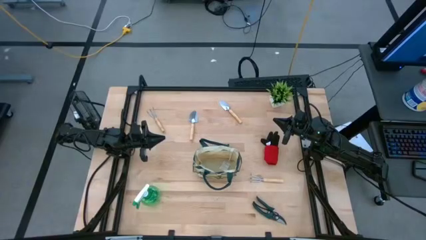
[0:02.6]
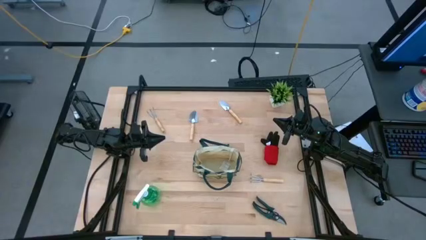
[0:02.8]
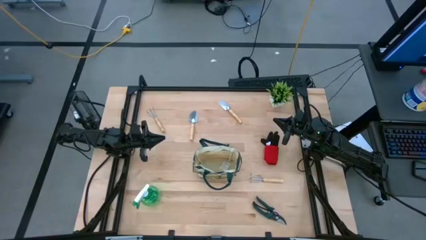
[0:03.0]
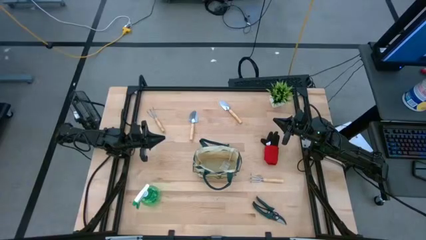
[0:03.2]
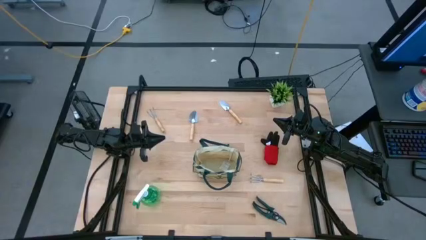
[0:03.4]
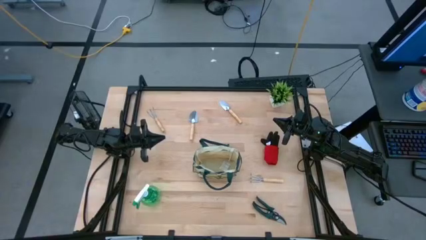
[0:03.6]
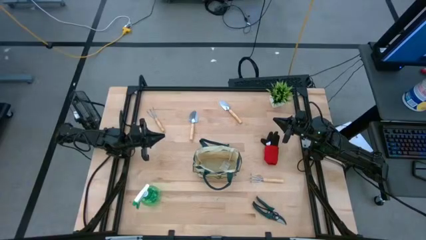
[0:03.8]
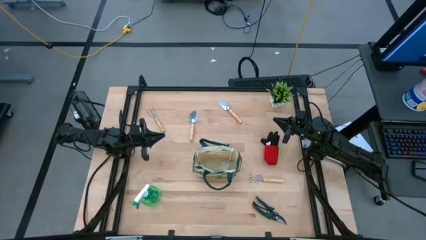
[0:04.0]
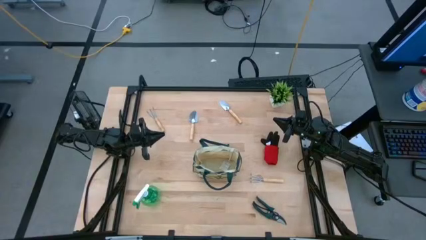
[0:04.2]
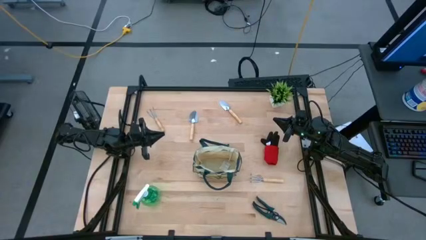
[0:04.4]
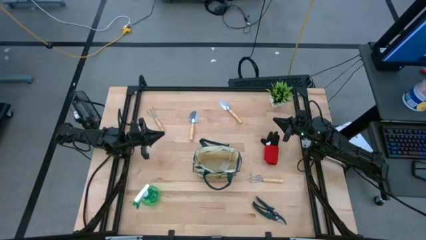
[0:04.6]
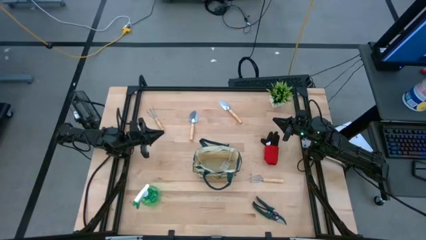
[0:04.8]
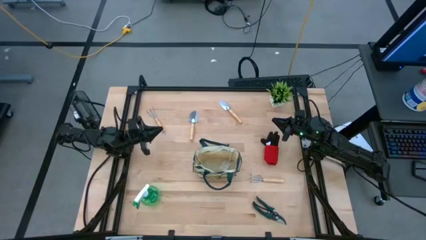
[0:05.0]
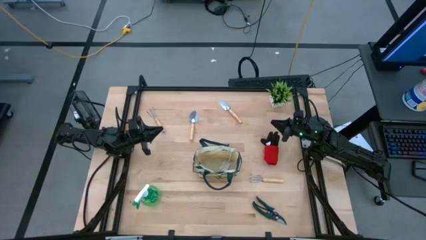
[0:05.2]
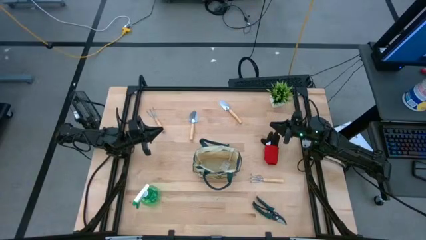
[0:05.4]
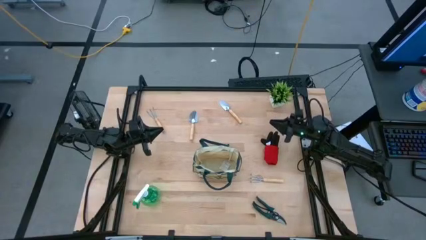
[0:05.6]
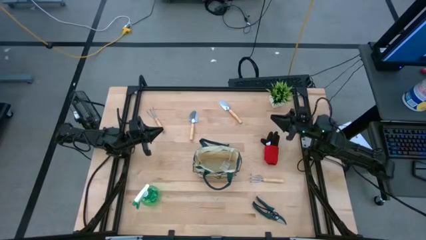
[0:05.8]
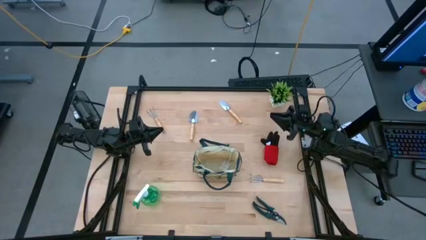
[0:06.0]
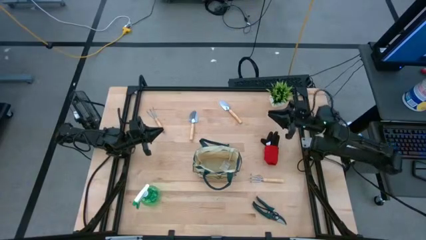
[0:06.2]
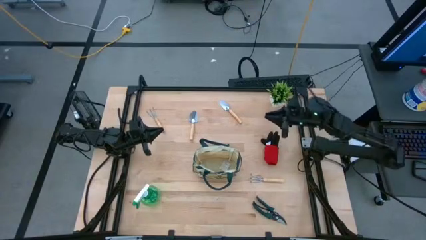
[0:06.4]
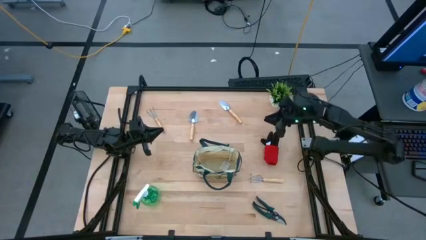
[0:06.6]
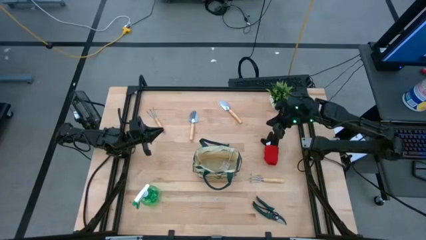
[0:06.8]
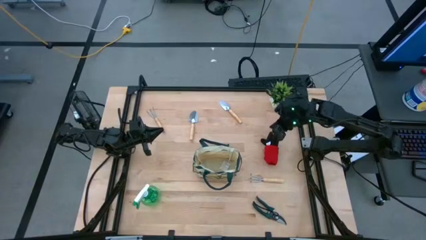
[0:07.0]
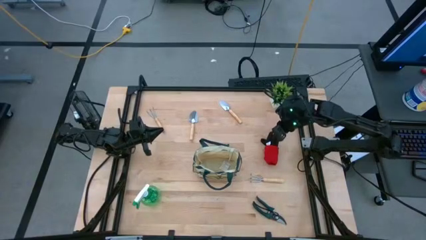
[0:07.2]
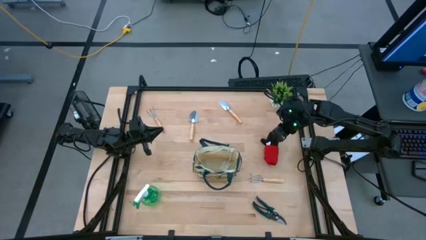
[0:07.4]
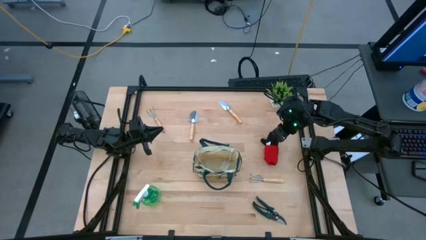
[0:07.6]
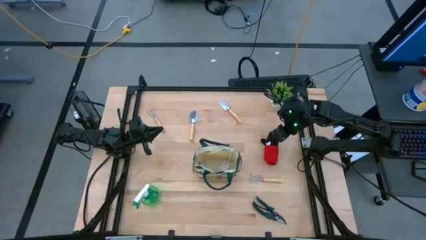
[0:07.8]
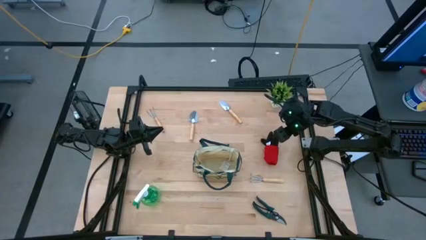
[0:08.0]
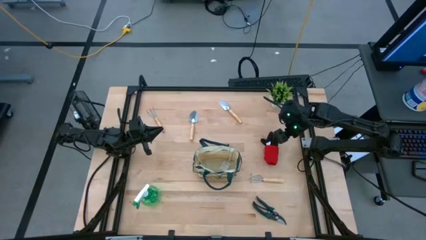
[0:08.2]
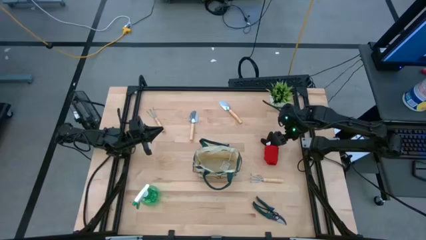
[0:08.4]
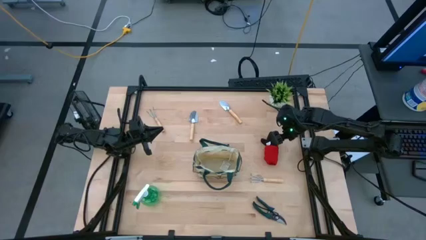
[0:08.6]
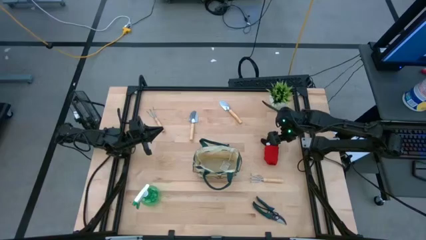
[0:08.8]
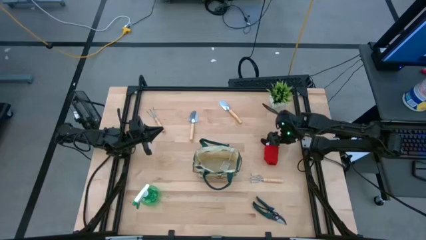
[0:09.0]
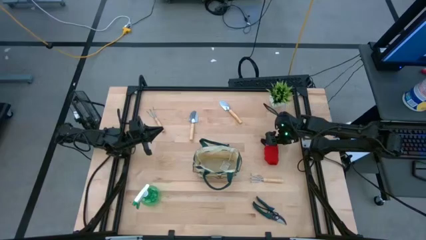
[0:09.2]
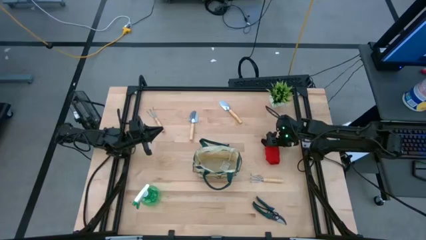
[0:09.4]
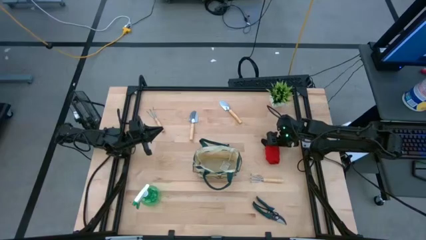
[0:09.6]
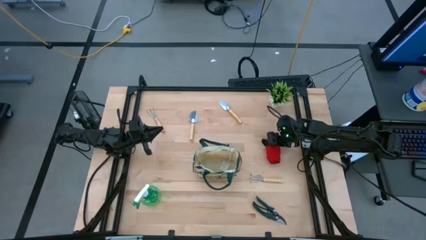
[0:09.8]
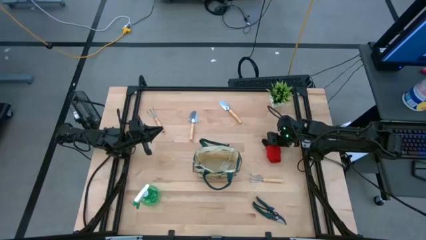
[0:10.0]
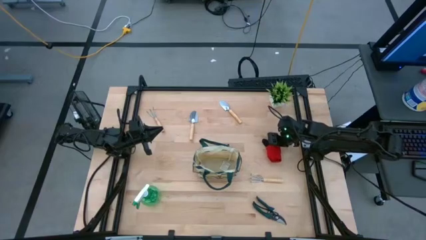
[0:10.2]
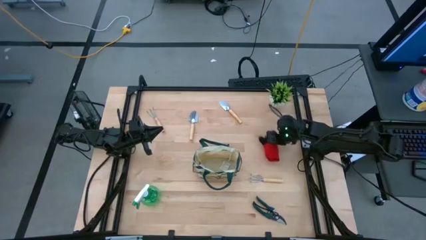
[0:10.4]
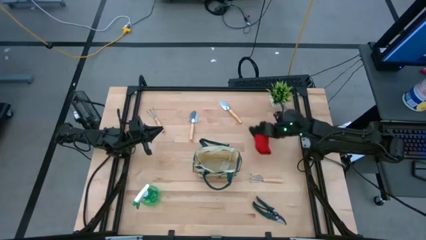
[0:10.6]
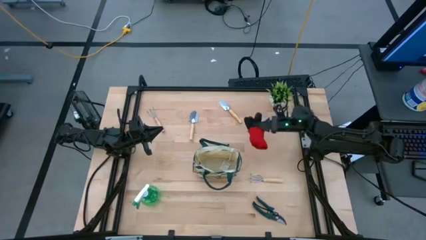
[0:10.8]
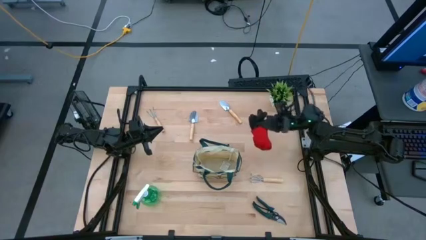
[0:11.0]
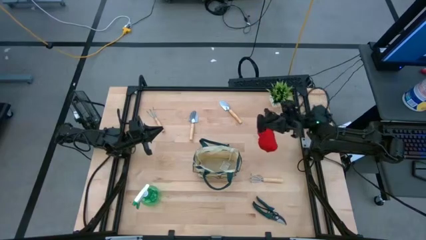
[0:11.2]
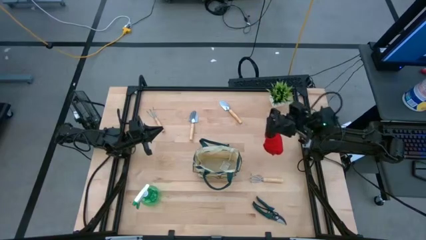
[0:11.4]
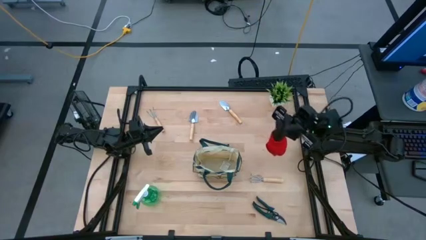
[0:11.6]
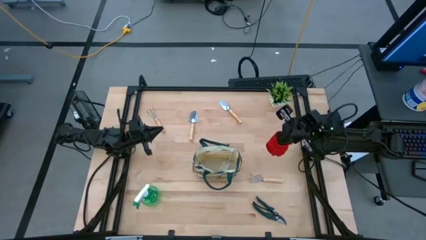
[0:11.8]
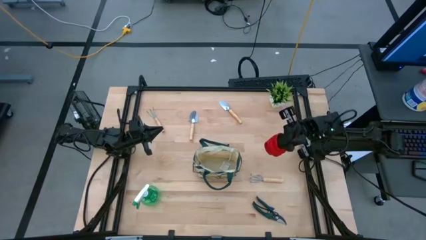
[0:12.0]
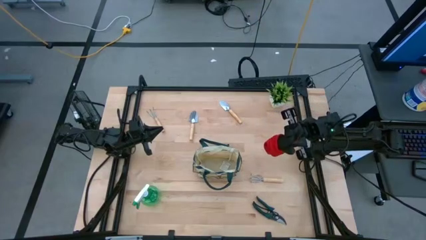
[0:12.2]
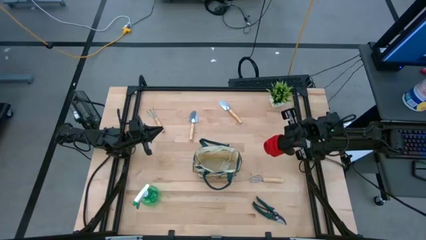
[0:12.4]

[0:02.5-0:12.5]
Task: Pick & Place Garden tools in Gardening bag
Put the red gloves into the white gardening bag

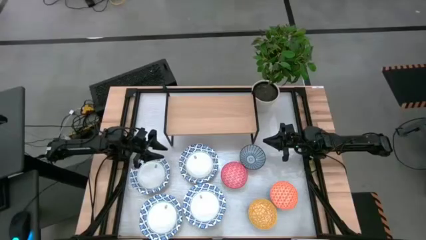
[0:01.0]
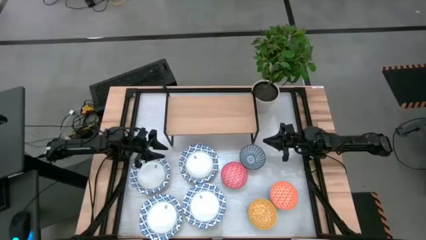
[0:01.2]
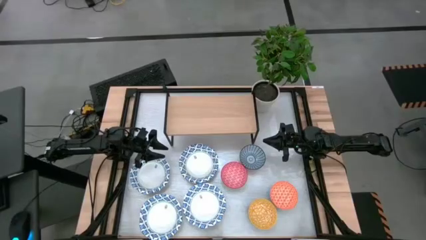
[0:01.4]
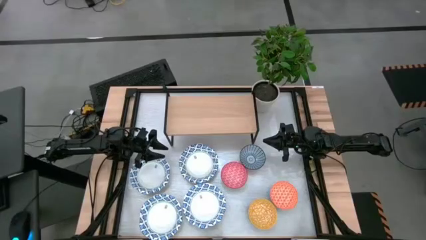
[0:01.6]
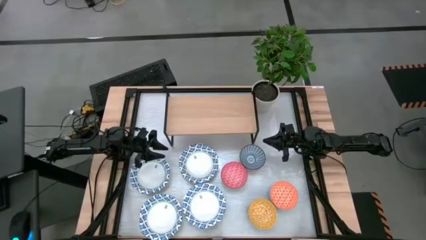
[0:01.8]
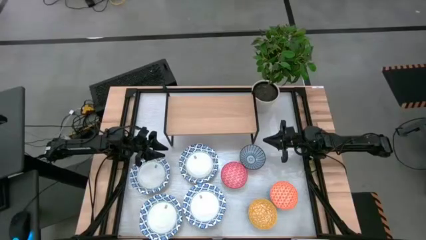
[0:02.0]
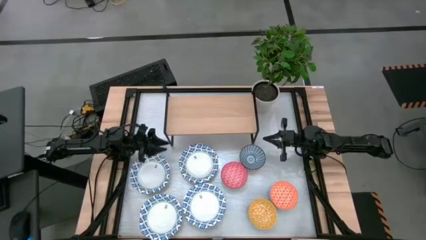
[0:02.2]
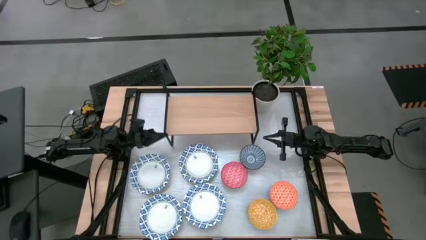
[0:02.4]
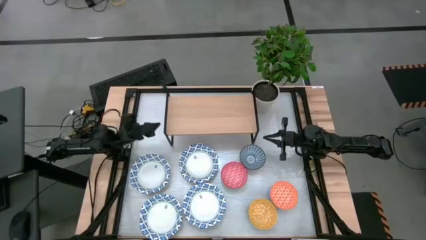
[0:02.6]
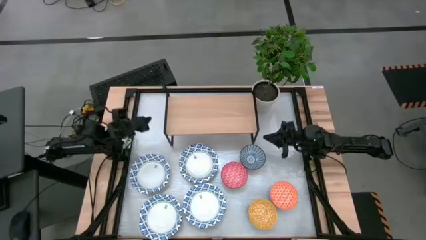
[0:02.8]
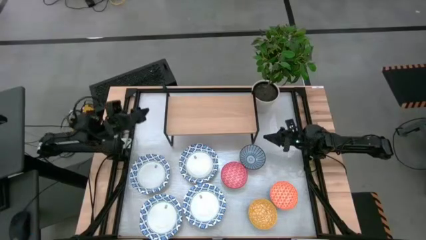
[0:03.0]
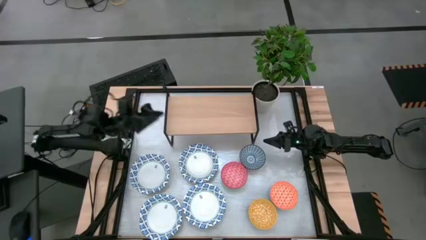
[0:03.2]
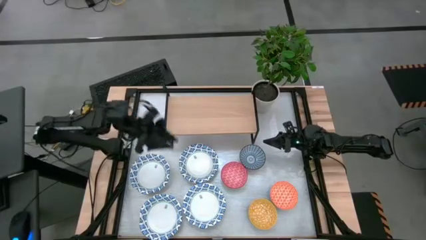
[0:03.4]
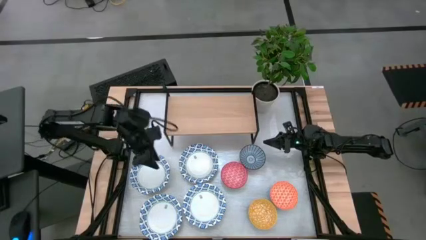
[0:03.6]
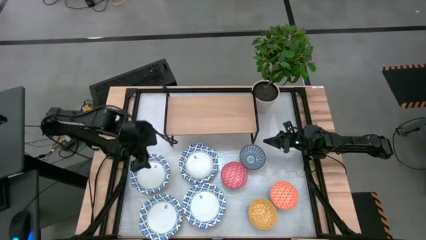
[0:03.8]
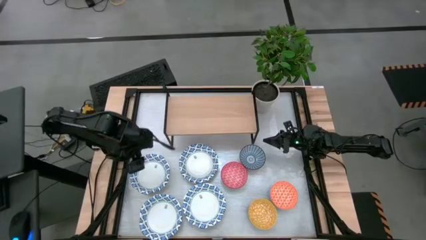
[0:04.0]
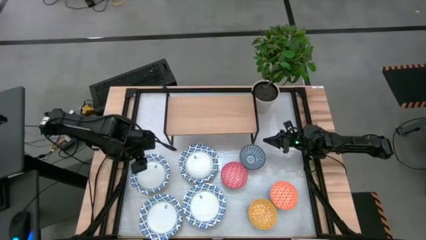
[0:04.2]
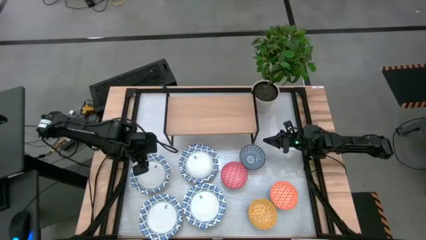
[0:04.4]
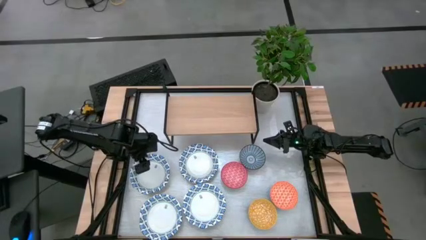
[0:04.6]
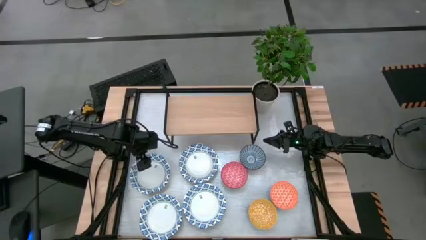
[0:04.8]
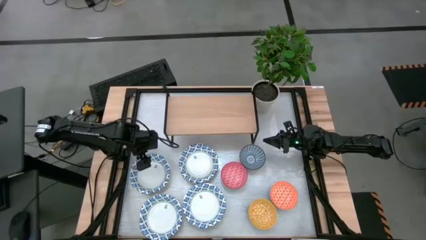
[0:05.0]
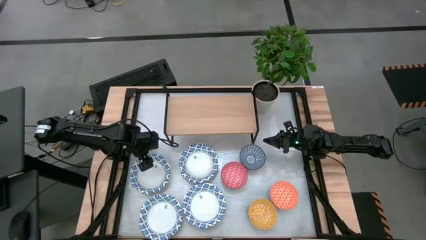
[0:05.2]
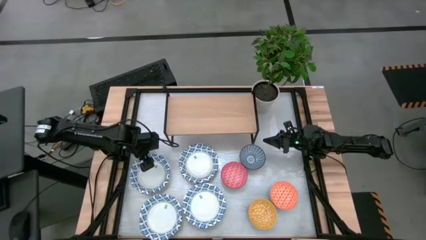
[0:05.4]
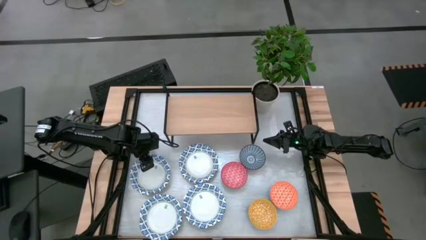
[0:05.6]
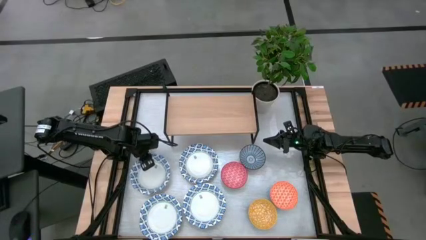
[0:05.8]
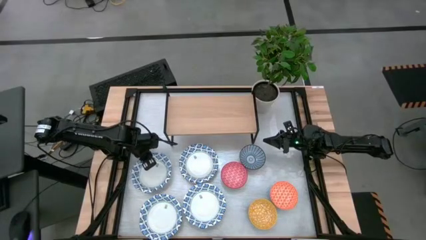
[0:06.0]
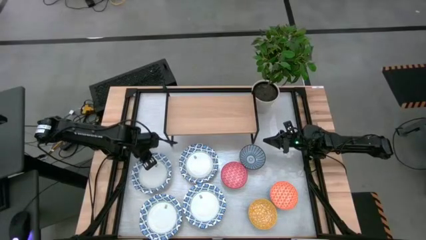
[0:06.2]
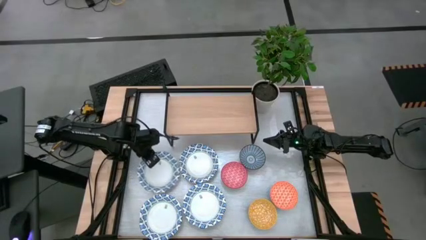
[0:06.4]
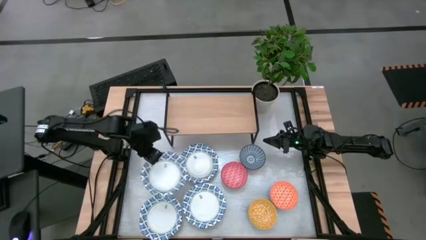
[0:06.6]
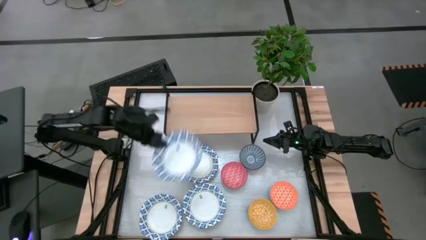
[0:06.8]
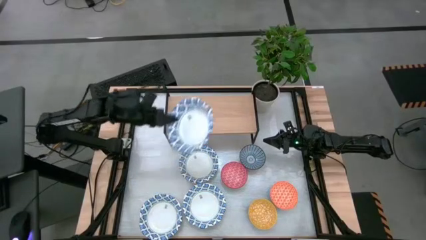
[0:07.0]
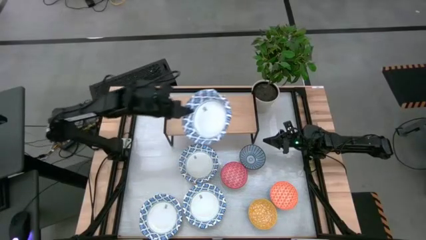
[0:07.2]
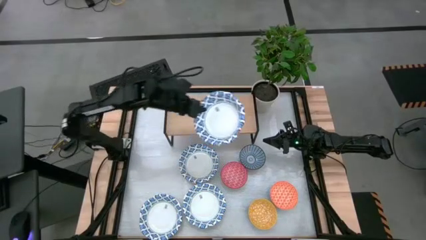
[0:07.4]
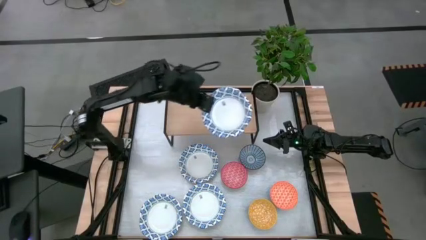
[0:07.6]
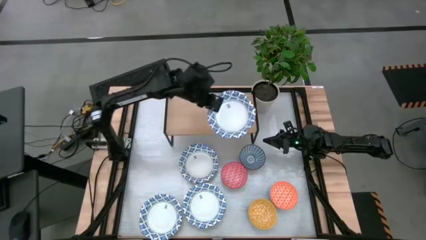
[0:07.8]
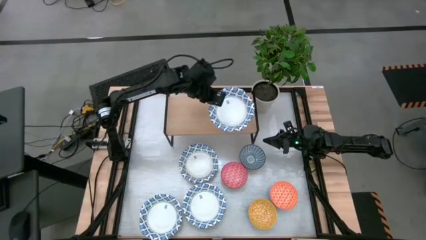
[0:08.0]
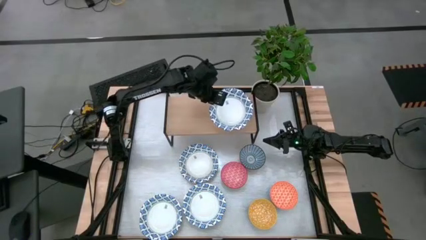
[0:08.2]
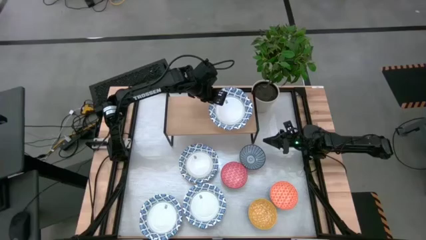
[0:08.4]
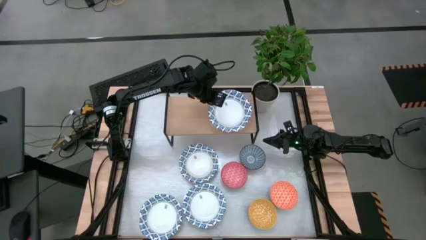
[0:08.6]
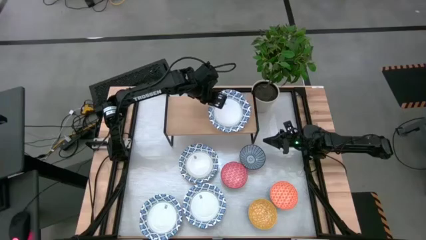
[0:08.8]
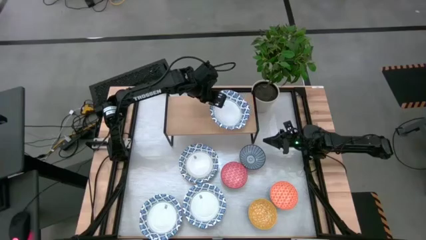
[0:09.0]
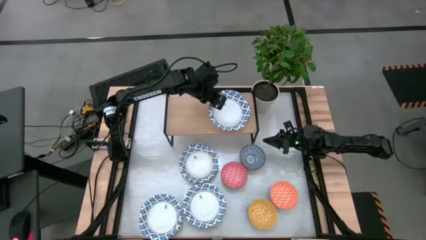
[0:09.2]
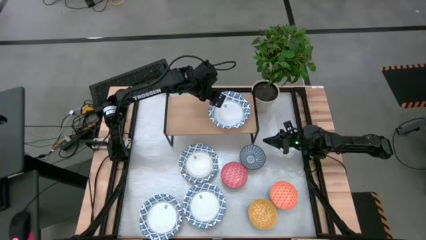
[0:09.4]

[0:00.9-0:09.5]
Task: Place and stack bowls onto a shelf
Put the white patterned bowl on the shelf
